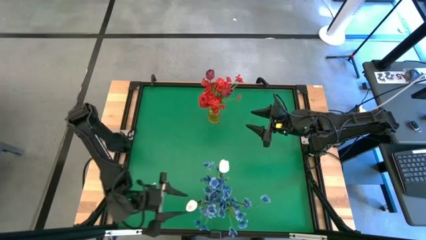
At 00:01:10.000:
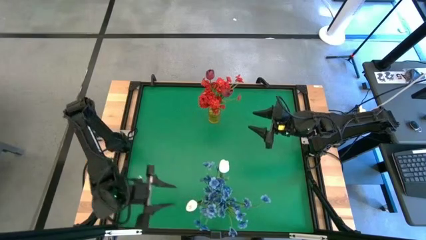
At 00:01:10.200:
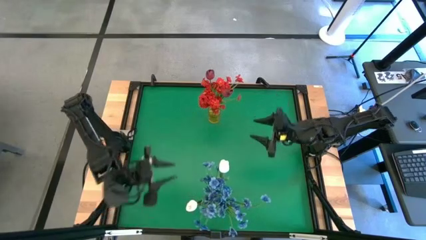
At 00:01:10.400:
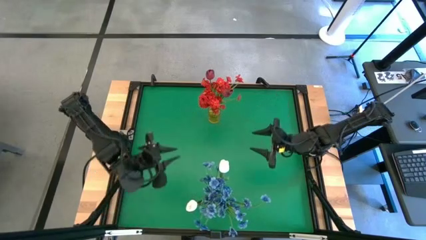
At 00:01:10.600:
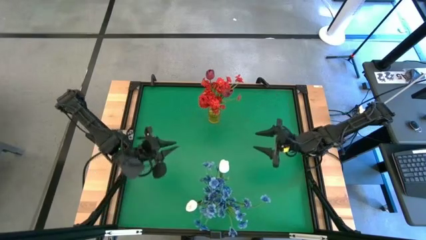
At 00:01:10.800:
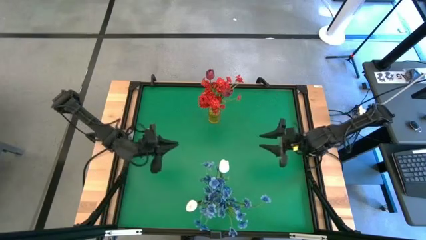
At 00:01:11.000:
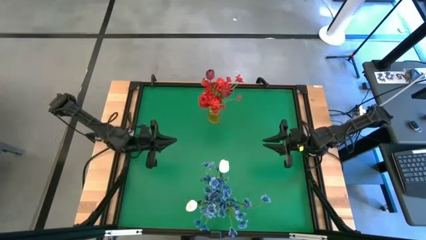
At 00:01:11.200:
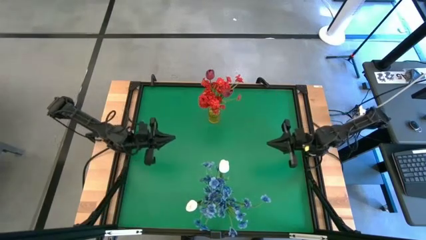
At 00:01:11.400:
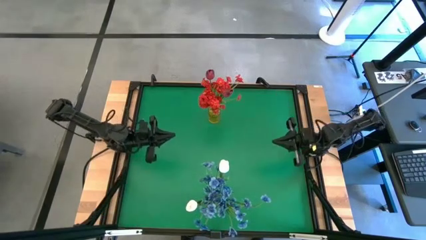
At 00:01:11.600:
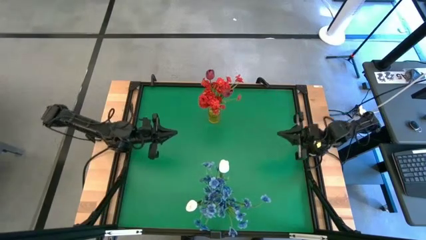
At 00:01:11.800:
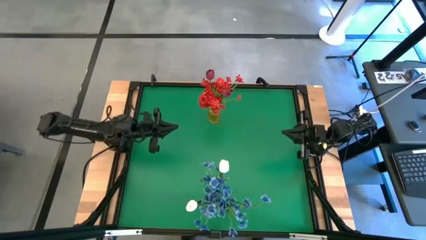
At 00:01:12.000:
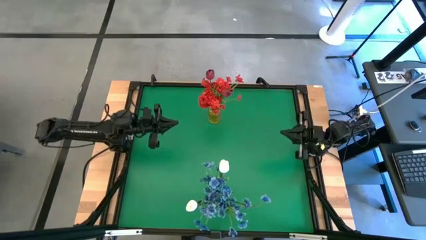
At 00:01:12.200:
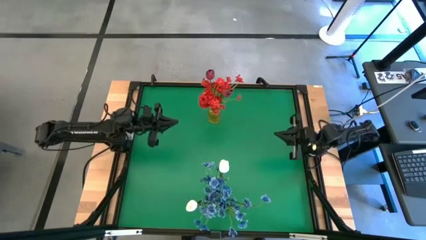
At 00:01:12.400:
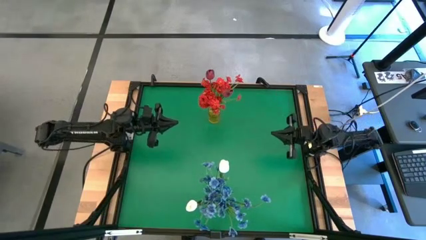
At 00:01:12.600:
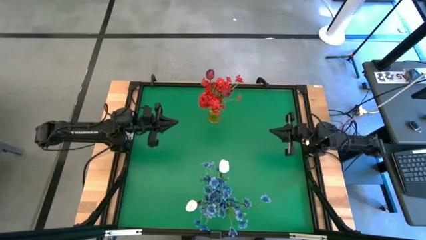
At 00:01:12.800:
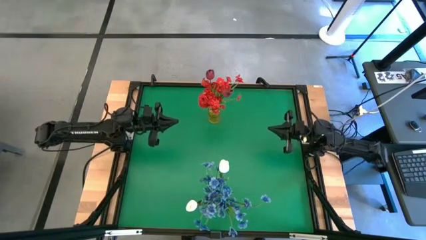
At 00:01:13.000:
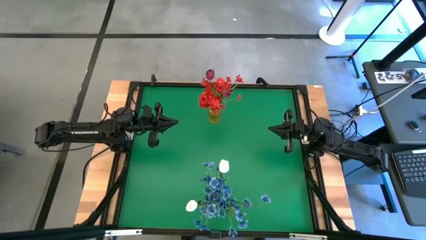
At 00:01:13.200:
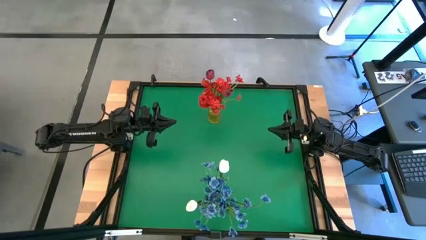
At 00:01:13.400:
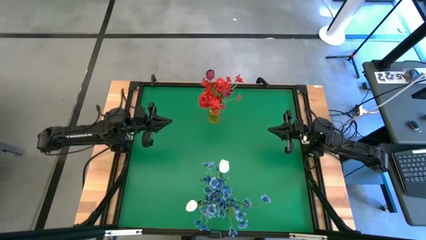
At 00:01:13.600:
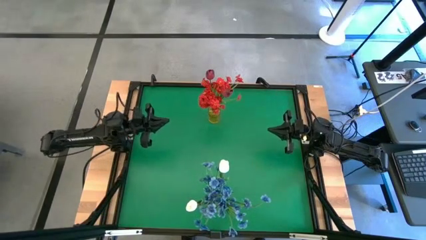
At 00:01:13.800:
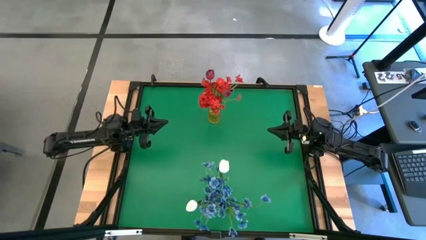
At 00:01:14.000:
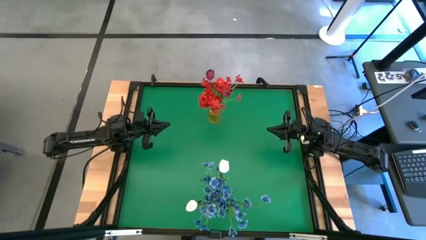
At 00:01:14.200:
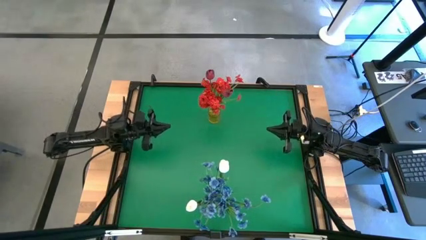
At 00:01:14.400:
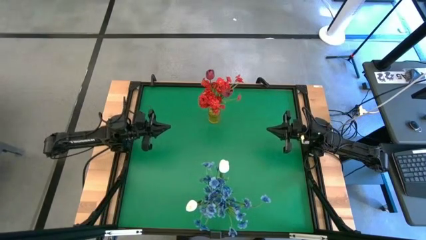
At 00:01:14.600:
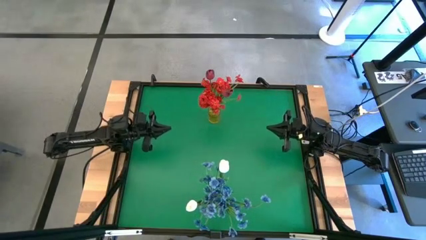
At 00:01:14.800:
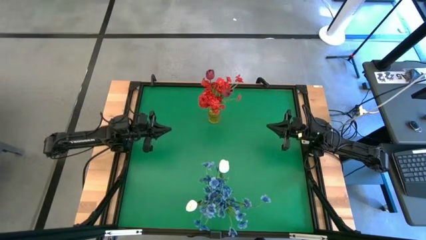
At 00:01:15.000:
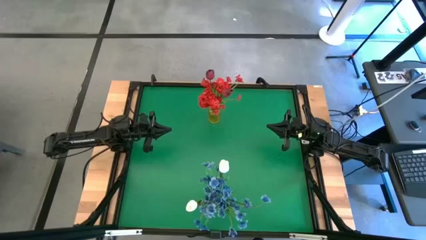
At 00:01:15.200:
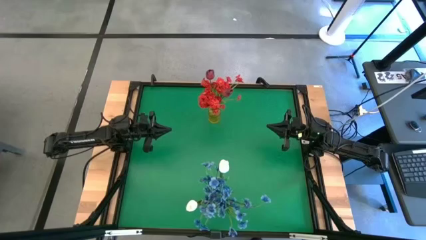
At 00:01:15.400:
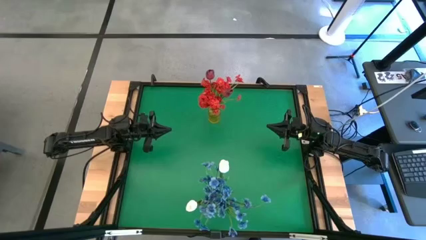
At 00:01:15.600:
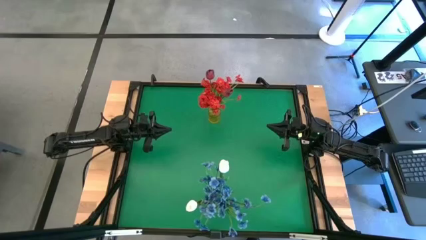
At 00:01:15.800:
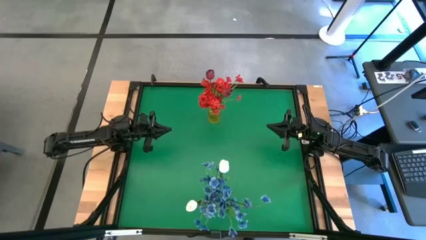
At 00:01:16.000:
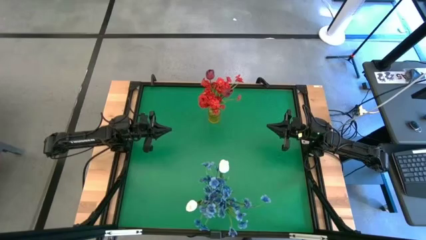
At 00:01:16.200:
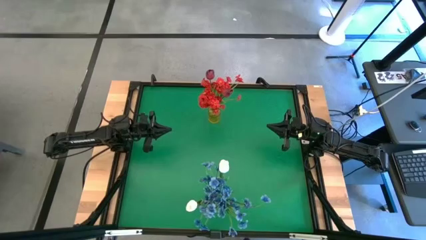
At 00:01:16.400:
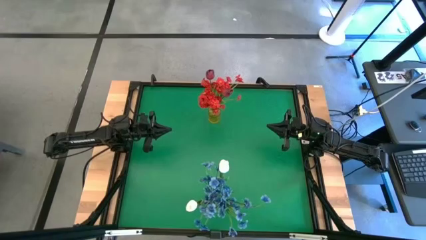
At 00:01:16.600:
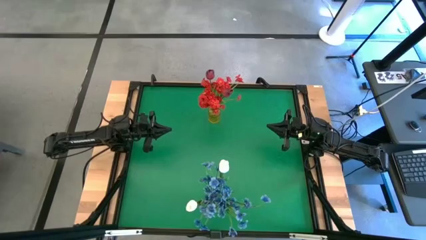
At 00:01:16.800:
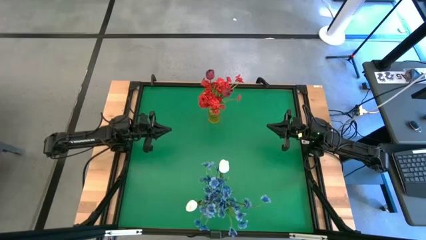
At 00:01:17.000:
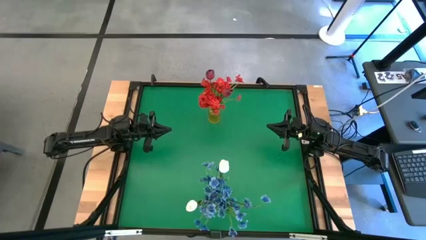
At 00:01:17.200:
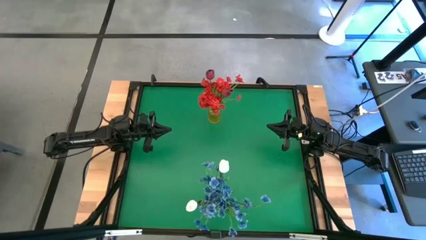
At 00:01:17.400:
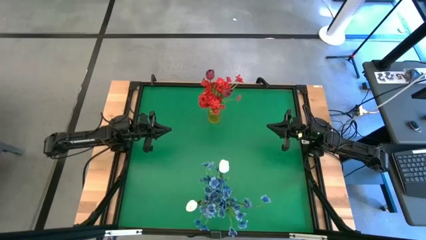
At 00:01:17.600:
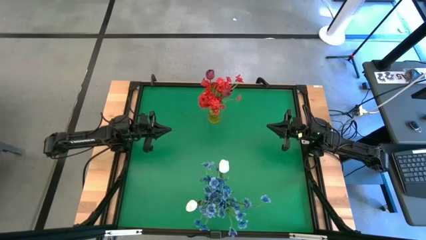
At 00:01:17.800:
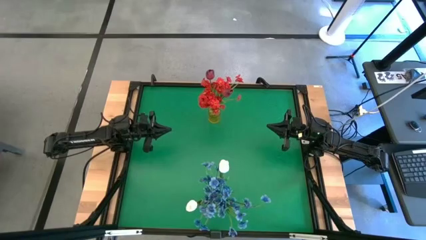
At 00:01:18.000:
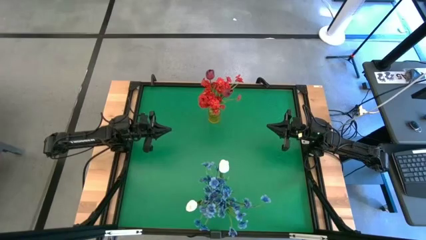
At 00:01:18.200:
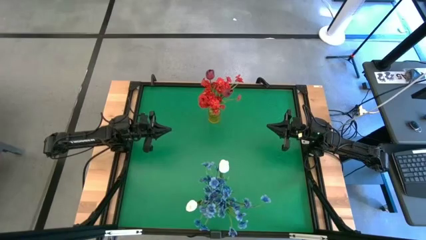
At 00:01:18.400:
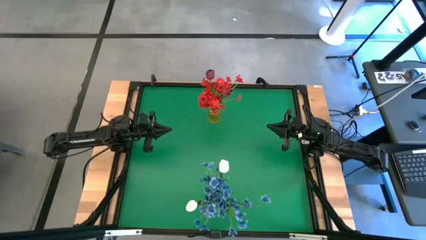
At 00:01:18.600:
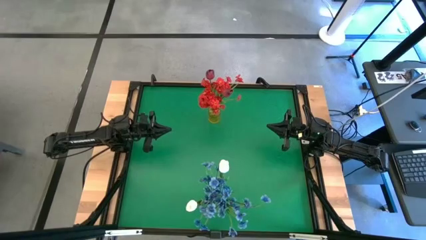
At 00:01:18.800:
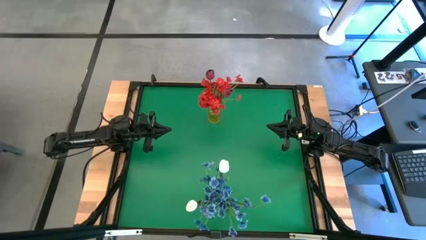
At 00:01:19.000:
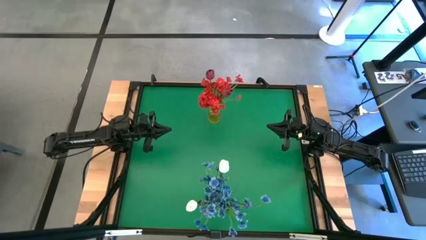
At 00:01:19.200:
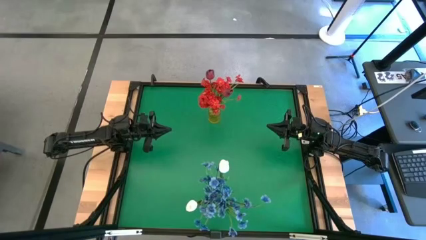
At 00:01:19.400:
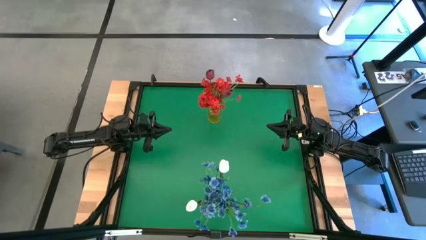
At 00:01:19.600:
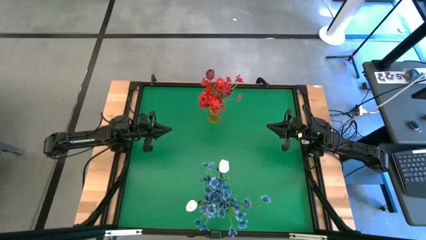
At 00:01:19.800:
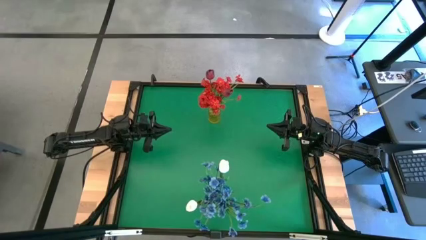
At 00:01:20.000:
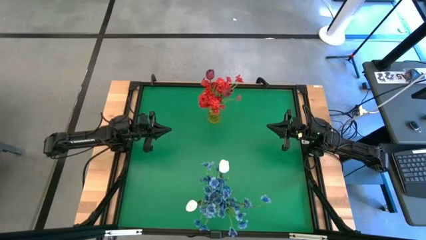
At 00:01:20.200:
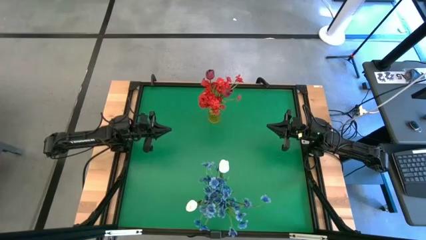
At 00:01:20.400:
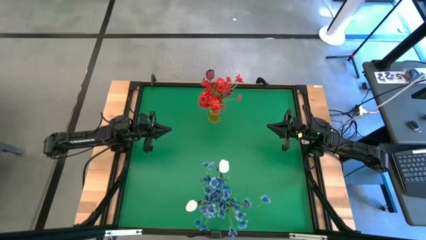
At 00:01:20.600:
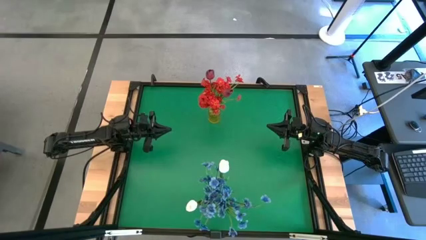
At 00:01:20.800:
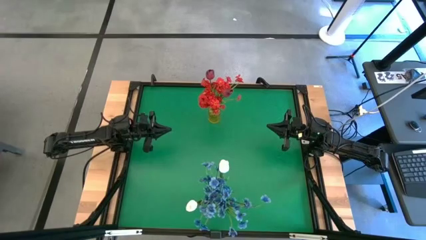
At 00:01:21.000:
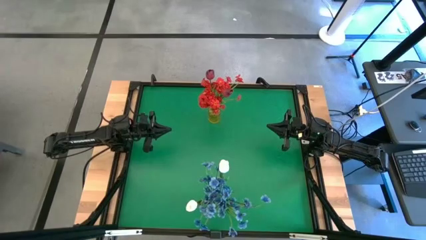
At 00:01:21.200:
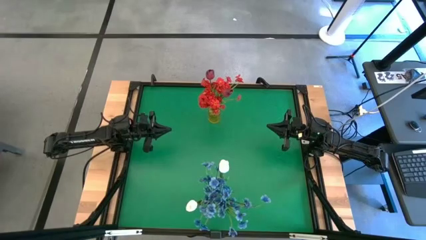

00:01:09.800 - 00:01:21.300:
Task: Sort flowers into vase by color
Return to Home Position
